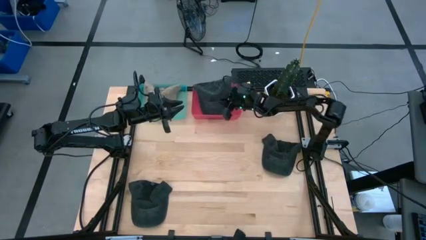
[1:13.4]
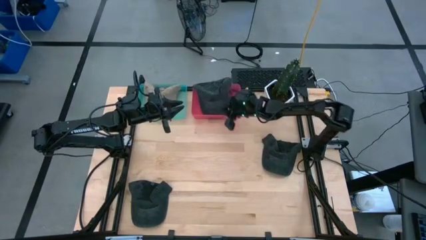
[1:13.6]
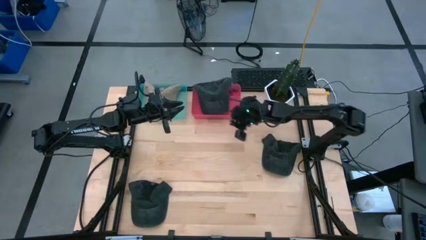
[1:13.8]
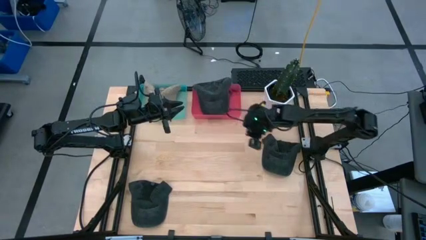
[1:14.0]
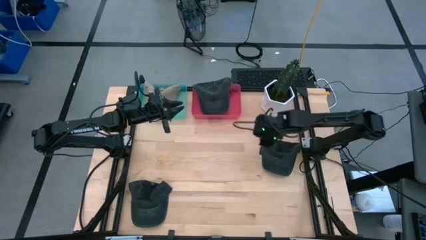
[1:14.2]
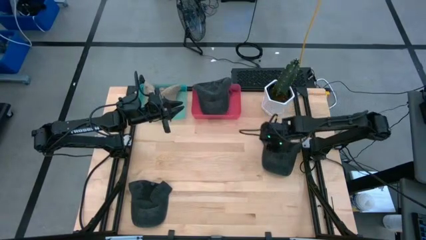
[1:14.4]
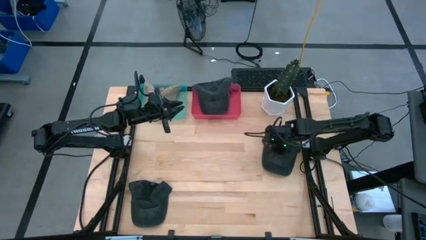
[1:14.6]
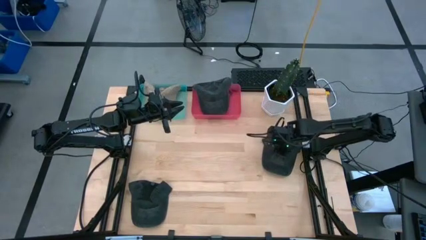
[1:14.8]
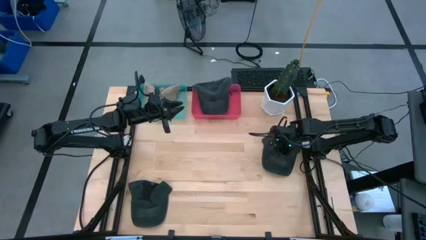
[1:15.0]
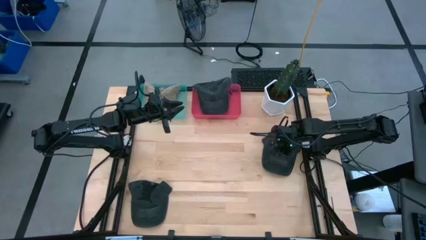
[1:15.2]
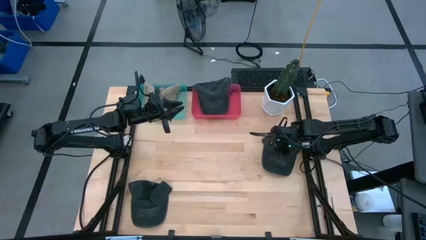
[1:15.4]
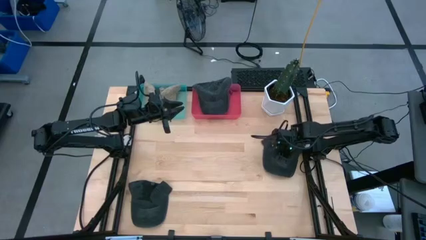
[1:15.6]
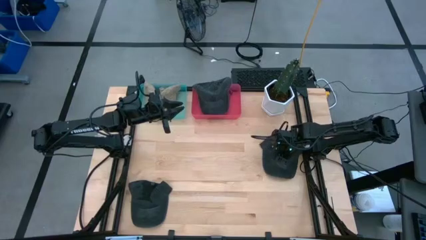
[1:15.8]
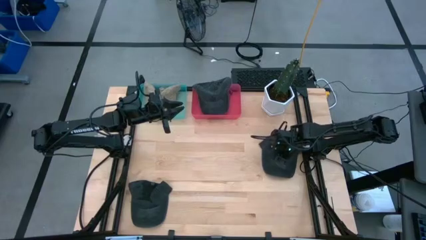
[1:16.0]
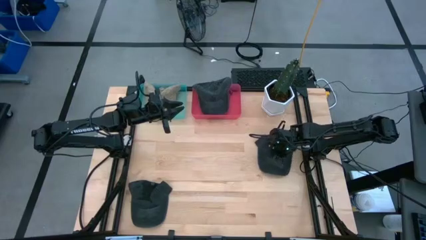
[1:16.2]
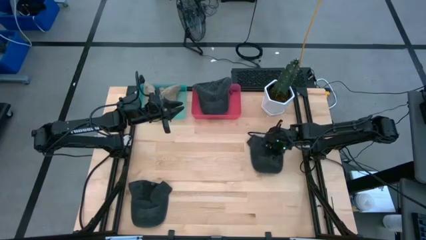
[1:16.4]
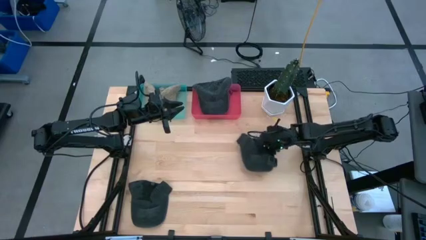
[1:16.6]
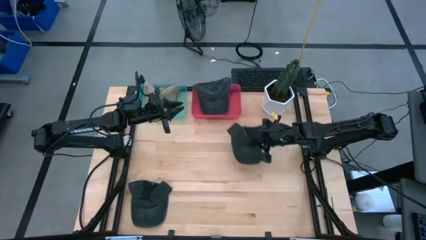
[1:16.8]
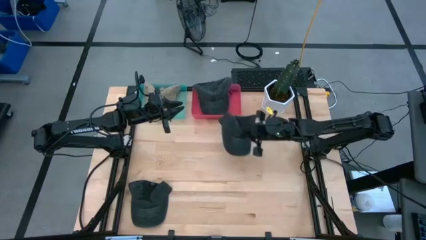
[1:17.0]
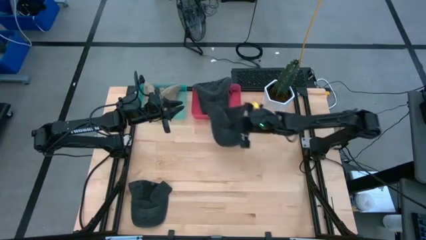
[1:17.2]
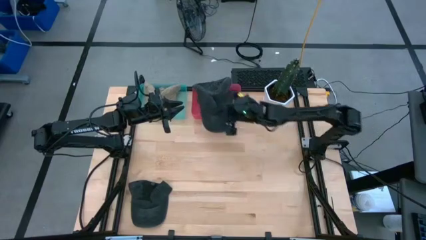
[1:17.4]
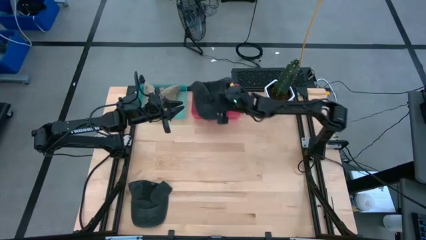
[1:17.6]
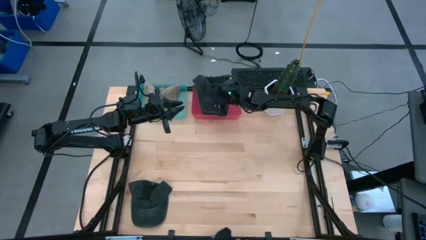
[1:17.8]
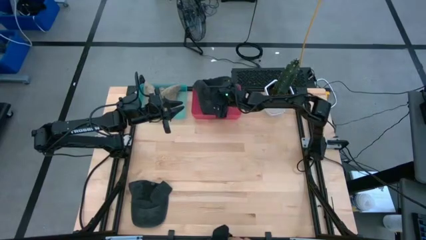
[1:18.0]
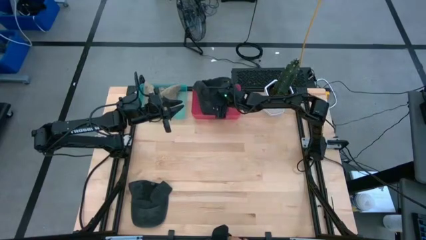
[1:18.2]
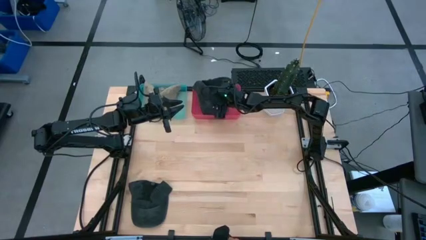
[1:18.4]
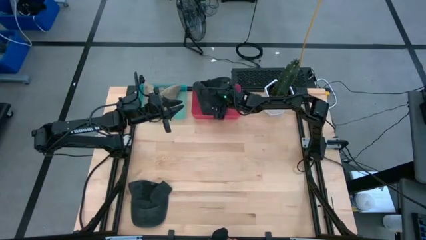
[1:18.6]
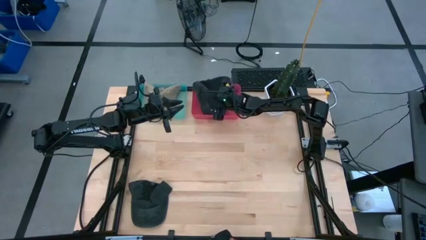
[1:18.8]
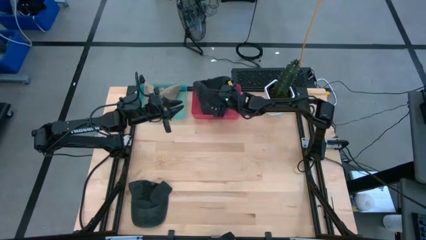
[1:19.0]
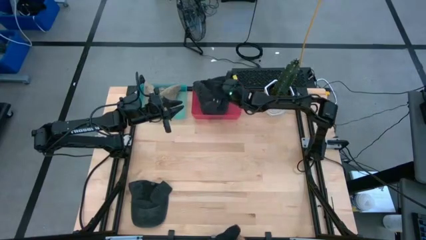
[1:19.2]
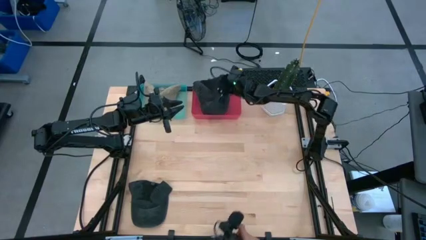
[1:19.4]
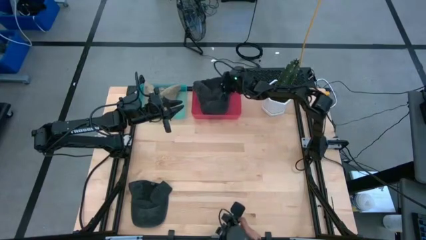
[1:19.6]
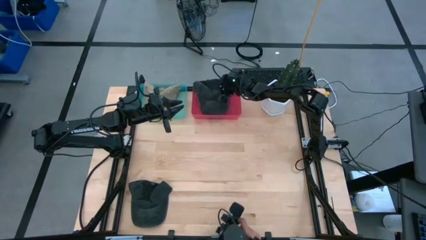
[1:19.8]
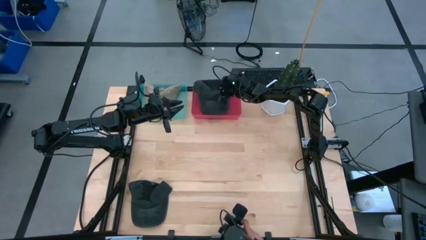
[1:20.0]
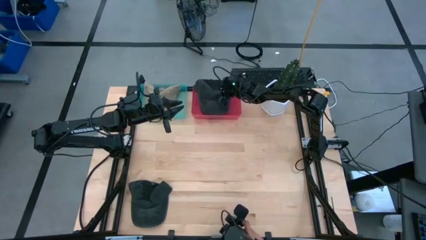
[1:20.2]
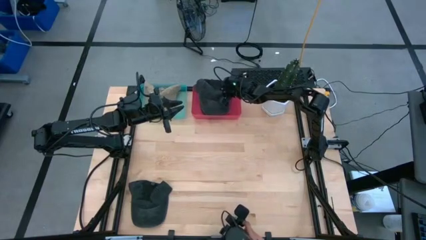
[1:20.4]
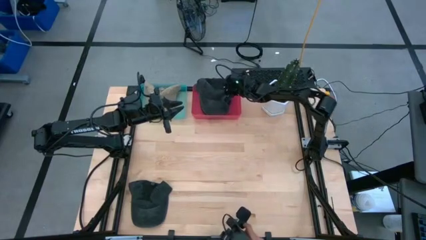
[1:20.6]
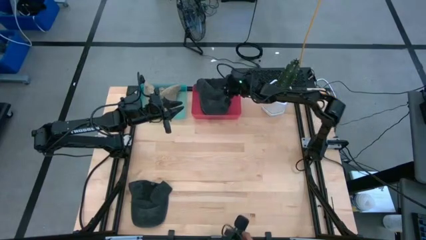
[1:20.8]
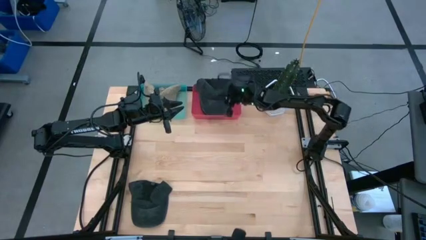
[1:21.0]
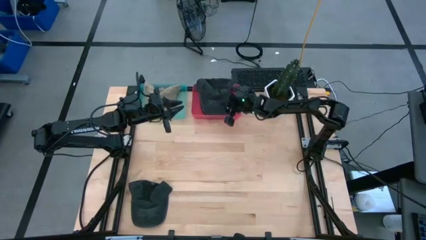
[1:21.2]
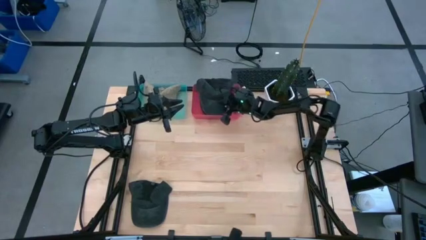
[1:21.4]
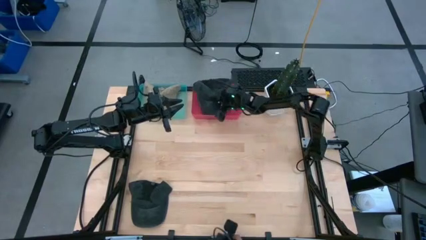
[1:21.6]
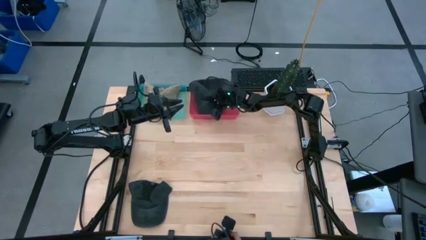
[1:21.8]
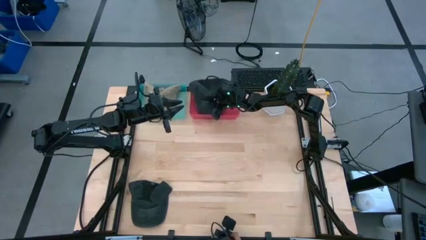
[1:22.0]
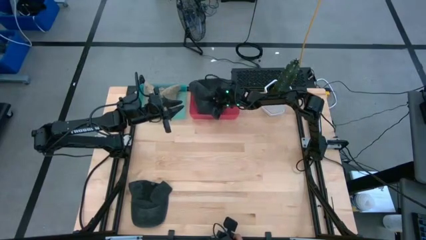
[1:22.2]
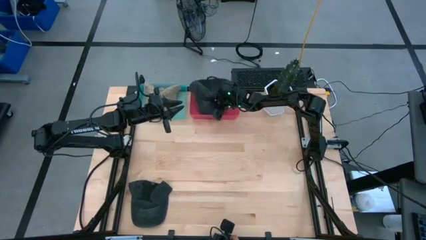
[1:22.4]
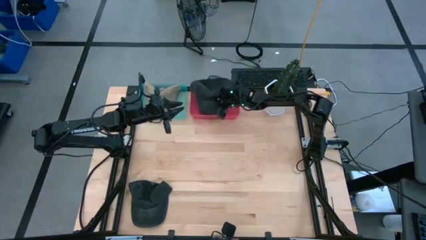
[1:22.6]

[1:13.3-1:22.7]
Task: Pick & Place hat
Put the top black cap into the red bin
